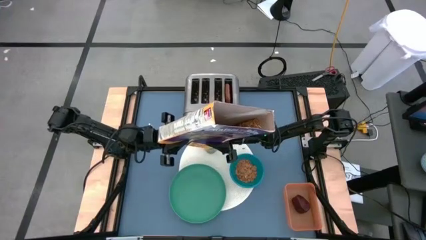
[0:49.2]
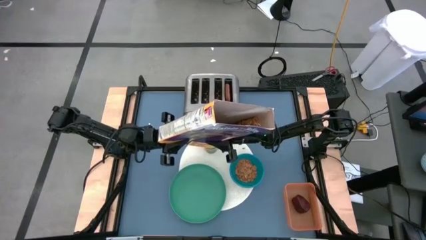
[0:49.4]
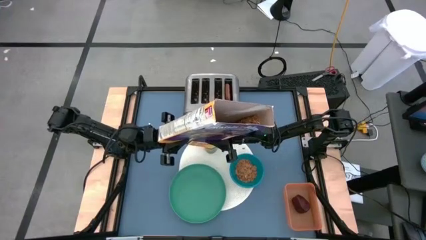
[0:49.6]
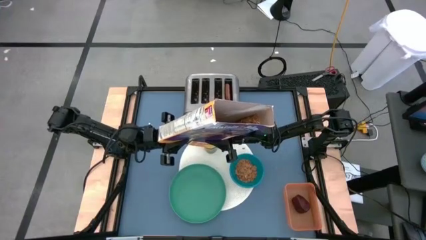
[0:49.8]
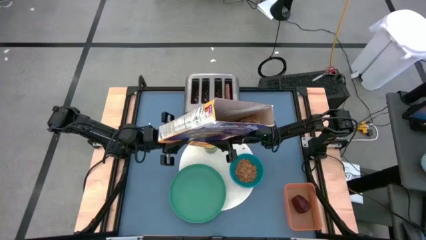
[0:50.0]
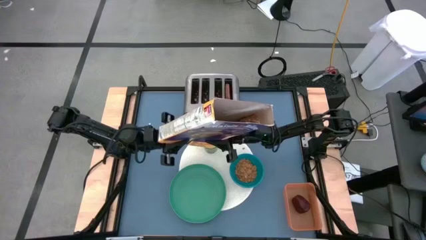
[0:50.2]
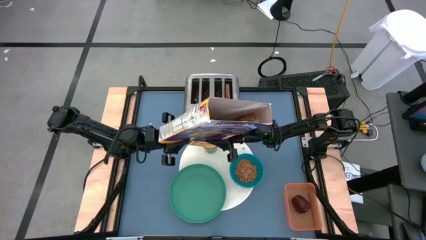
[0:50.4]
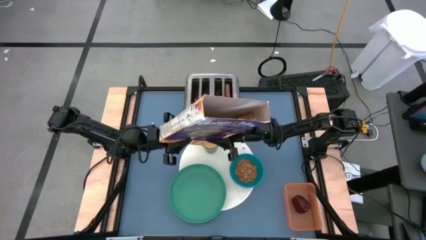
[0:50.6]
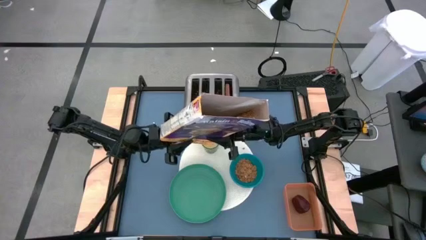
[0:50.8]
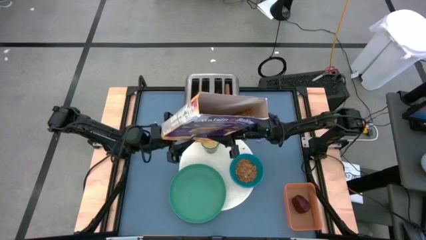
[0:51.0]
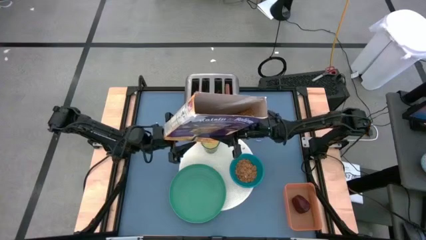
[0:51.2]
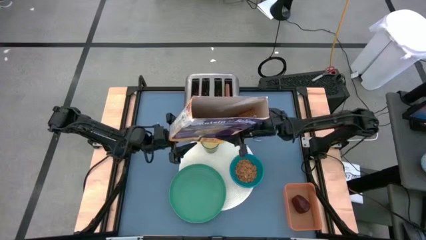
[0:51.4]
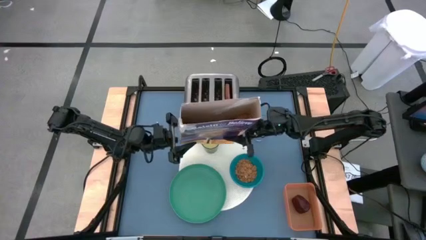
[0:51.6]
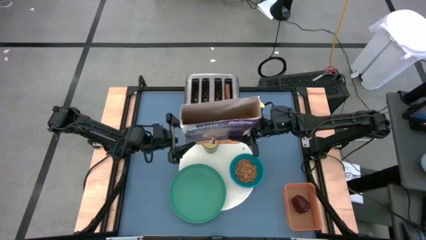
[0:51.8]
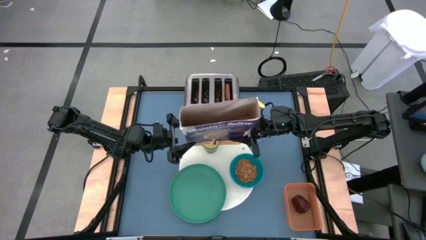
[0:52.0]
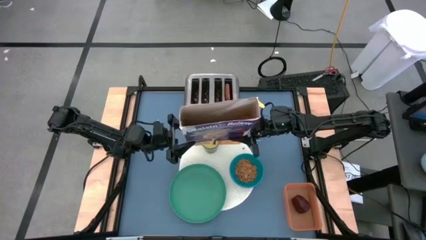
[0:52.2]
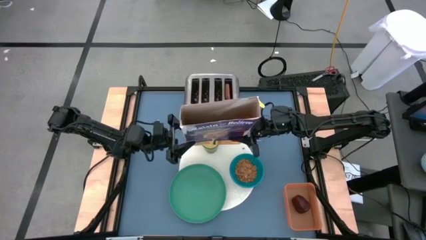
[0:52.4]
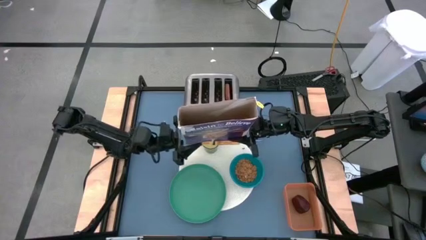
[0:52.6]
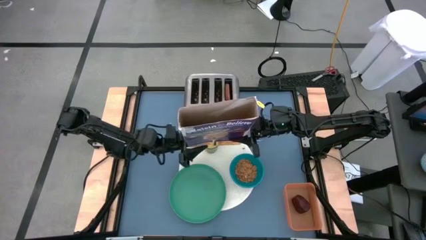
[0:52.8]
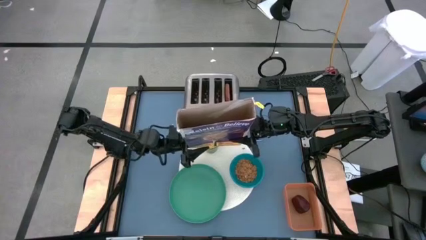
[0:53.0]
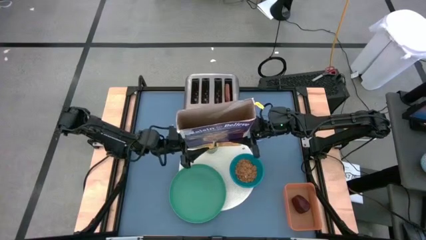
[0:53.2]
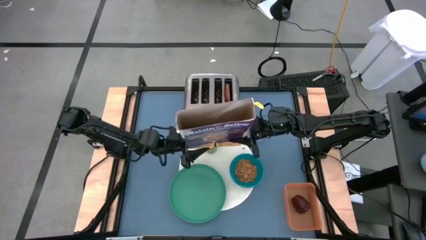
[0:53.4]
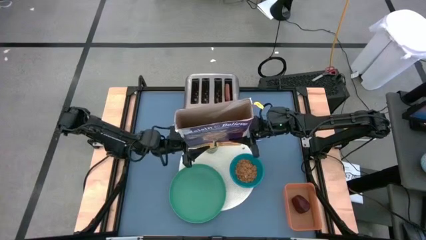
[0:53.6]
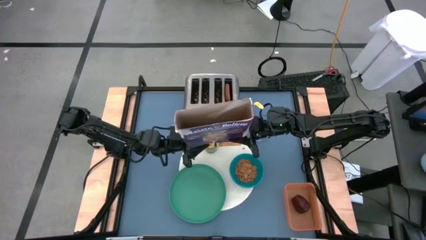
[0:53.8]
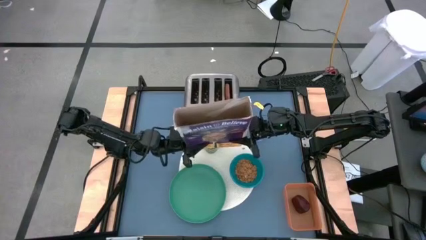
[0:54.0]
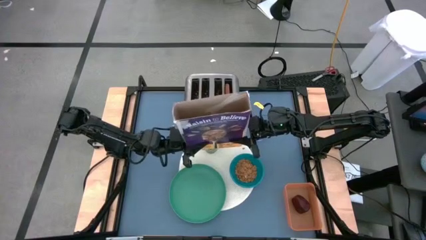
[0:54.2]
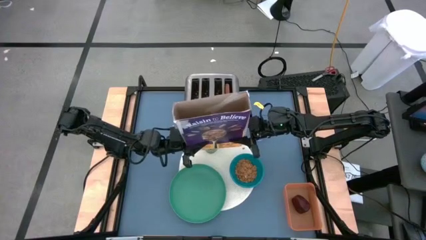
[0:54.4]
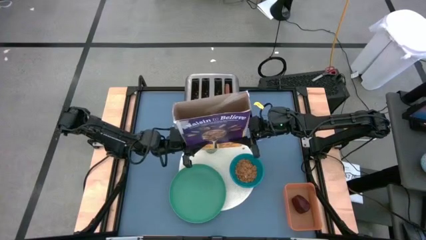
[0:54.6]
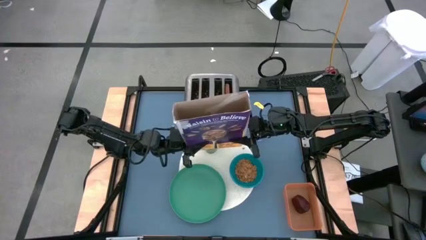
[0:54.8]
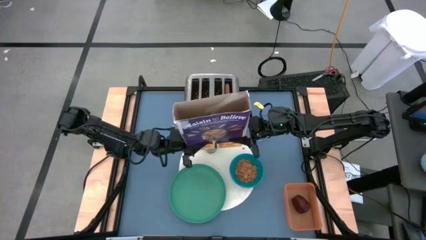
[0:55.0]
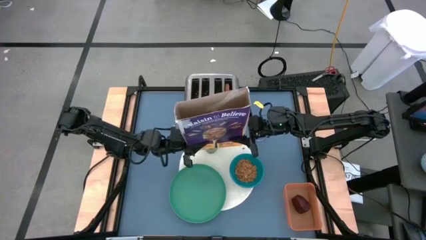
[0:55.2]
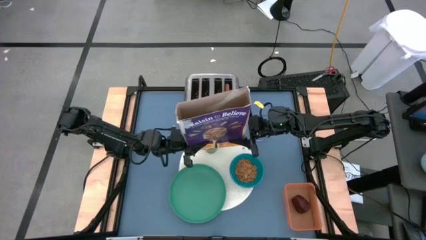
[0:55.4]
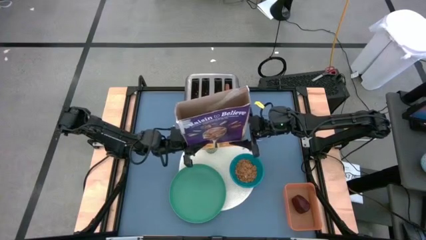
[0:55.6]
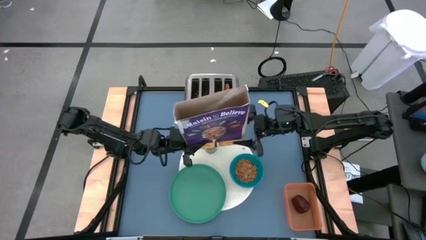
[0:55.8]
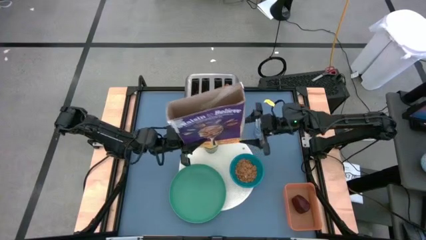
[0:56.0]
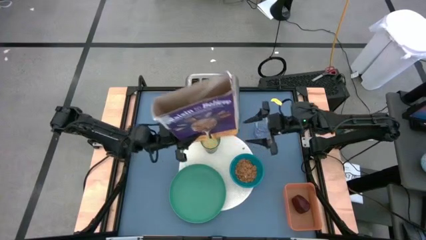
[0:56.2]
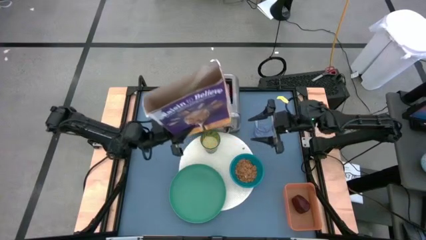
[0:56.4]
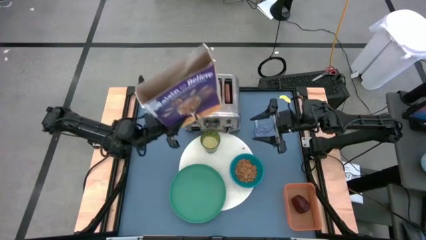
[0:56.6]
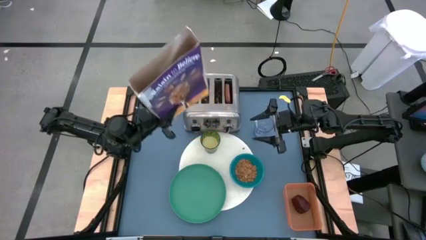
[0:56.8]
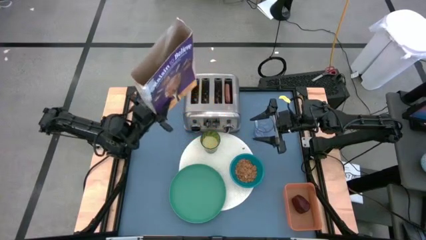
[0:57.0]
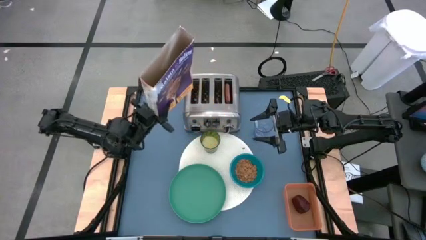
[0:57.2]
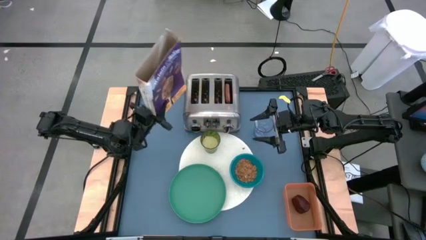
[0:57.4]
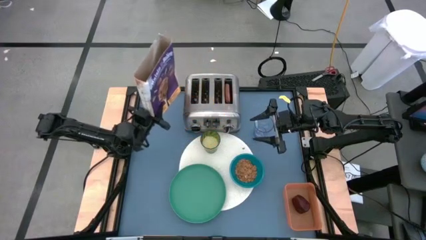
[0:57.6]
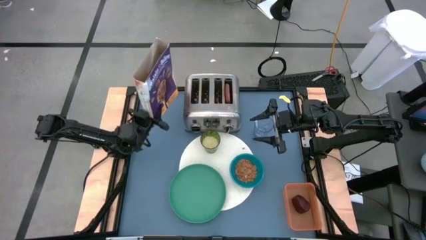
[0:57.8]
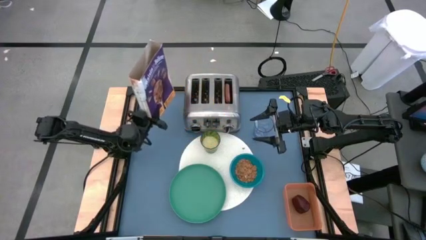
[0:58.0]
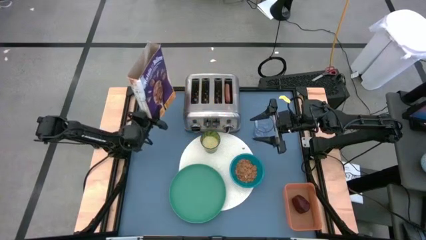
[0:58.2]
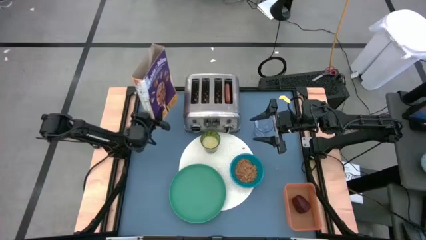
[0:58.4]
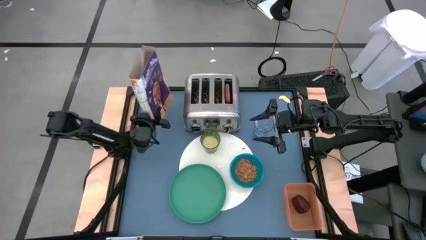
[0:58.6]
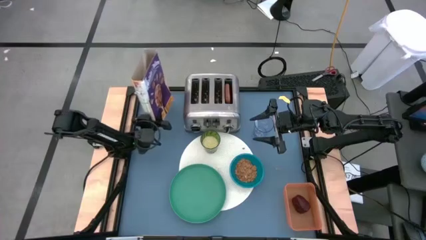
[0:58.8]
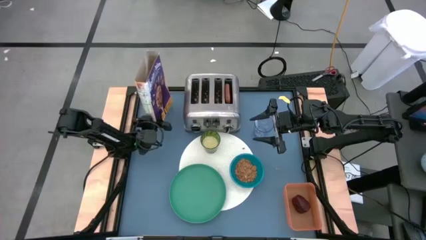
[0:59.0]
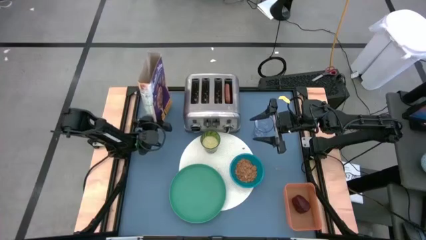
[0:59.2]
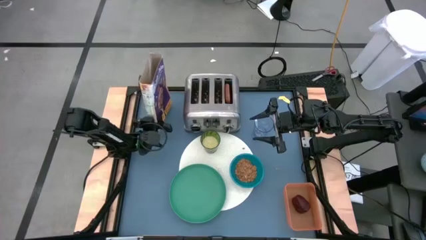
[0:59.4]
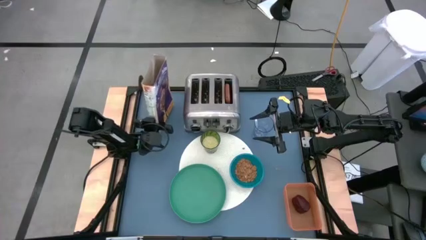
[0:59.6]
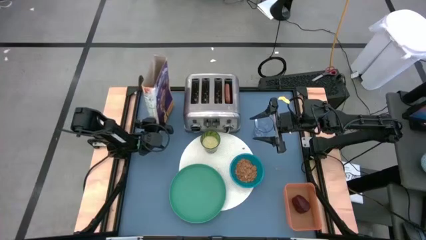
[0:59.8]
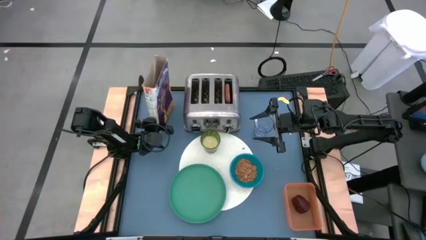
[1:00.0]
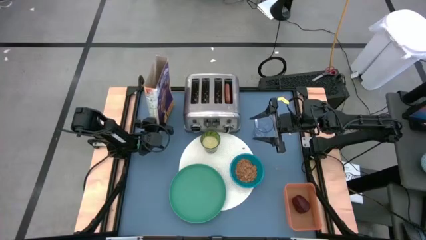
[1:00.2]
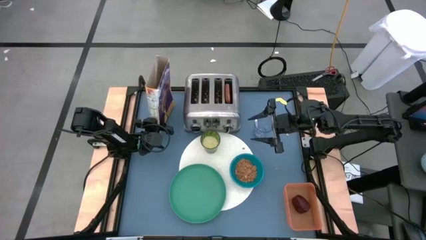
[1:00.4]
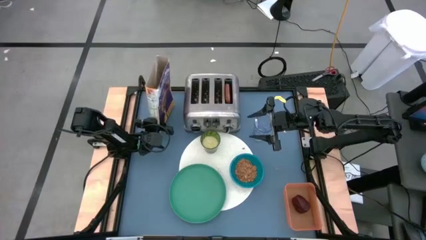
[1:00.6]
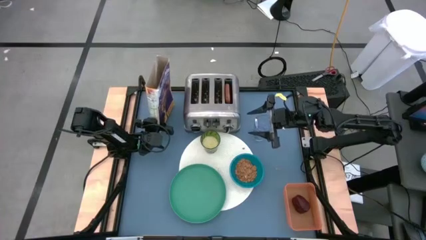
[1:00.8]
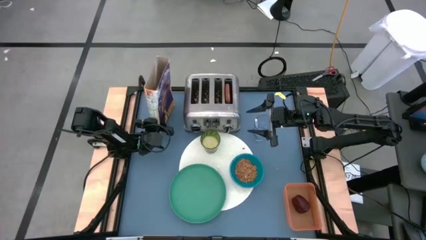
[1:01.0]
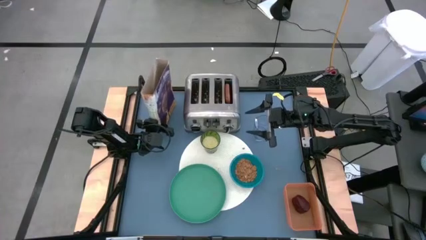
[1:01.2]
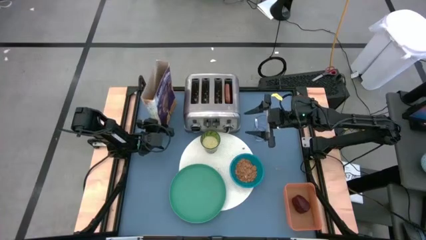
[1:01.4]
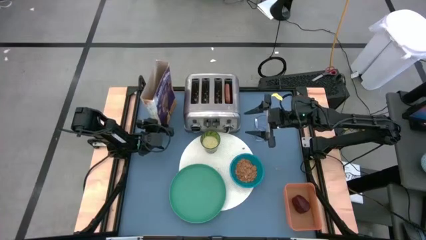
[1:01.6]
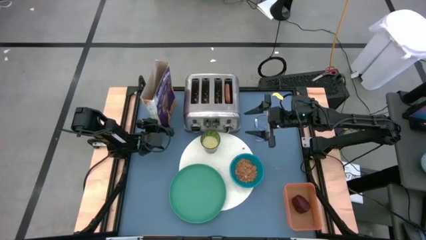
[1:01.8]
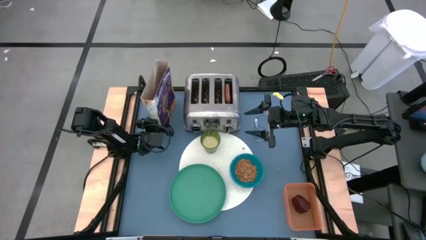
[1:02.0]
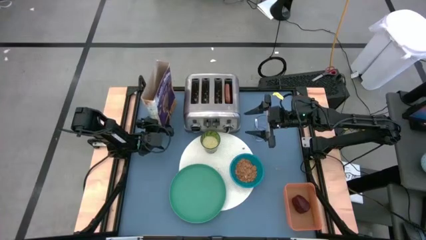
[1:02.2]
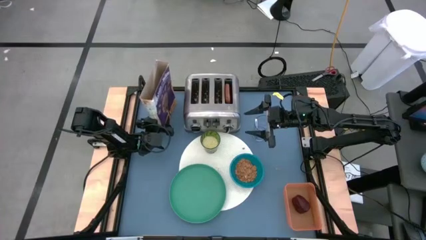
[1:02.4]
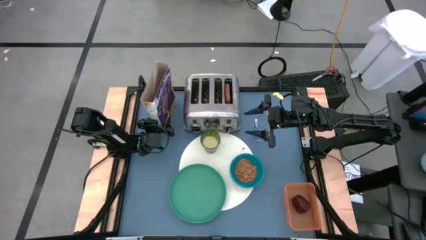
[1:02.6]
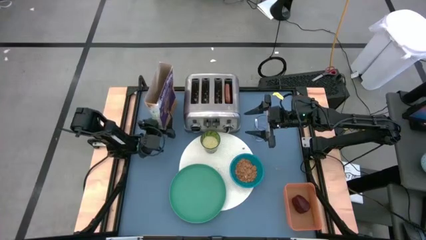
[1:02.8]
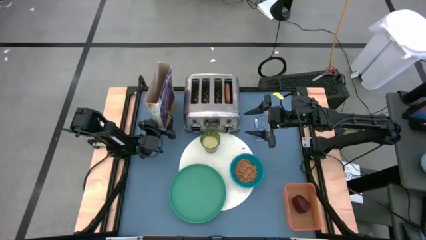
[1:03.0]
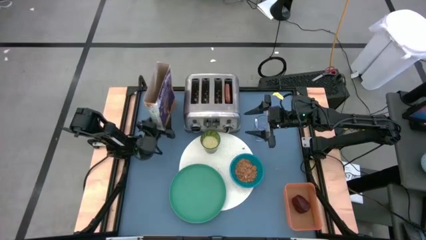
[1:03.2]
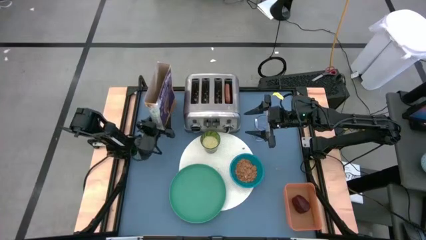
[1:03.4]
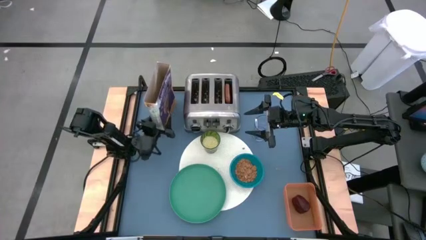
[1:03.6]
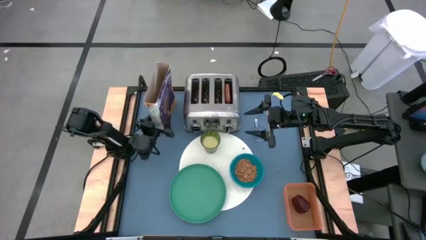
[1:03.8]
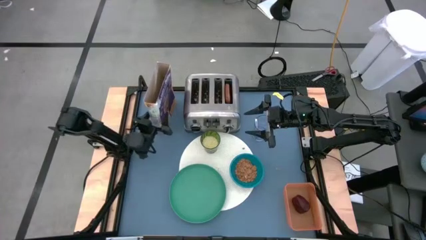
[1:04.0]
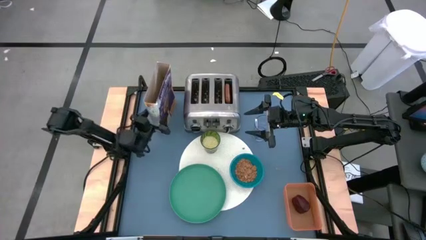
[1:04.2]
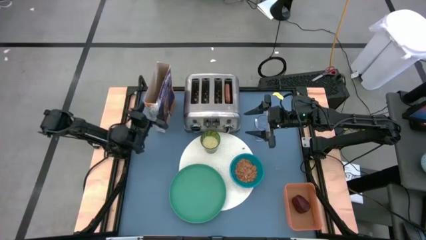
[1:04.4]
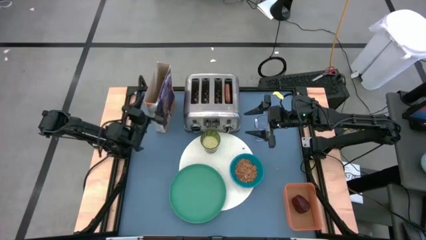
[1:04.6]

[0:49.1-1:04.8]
Task: Arrange a breakfast setting
Pour the cereal into the blue bowl
